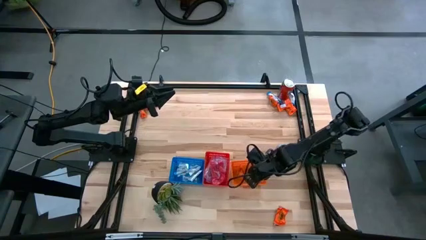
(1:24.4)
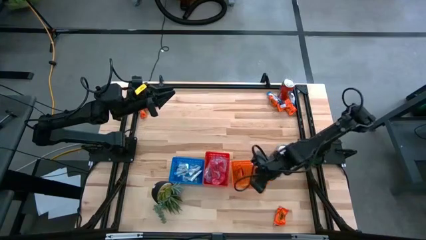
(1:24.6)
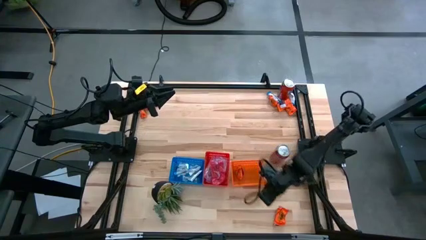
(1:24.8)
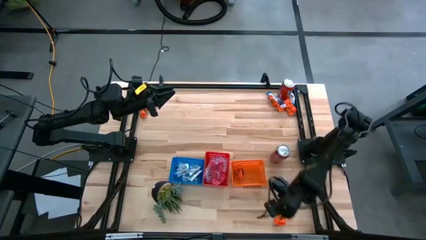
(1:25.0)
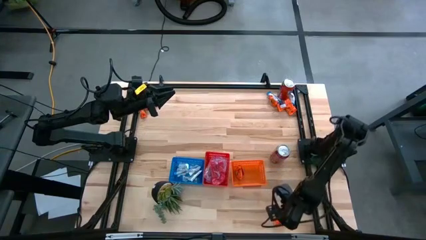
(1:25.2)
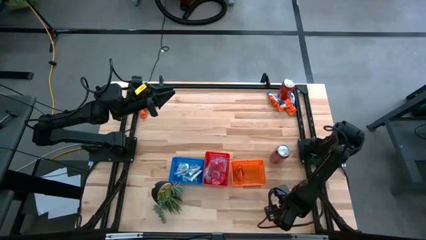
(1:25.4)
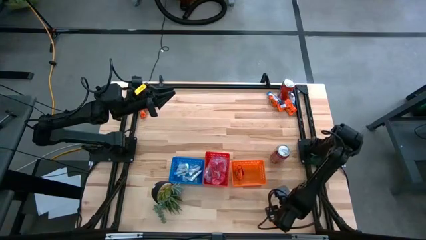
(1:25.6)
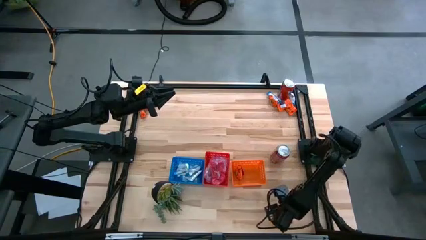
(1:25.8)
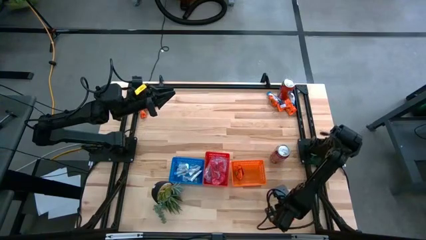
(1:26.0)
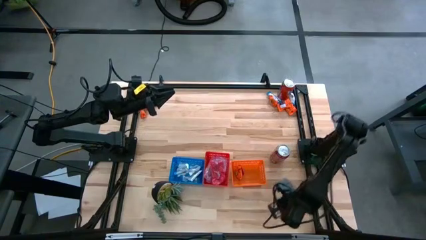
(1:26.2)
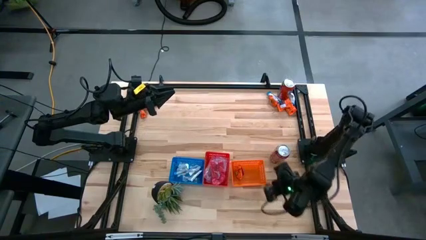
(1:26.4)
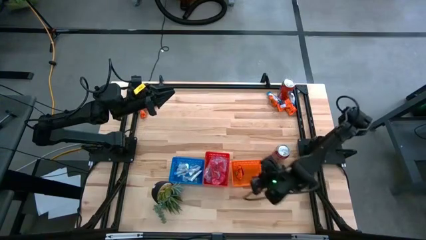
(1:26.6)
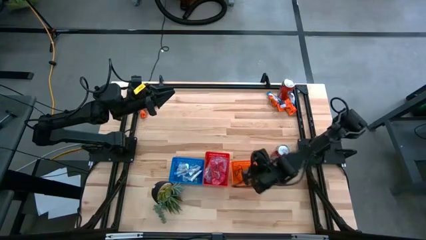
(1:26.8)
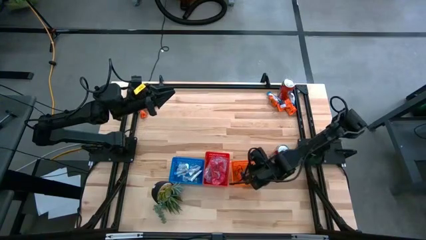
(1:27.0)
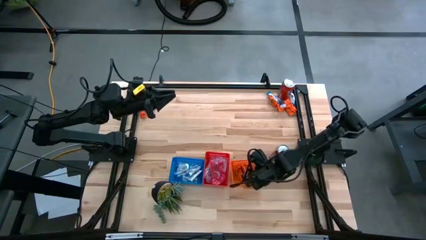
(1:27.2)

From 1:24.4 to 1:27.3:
Task: Sort candy
Put the orange candy pack into the orange bin

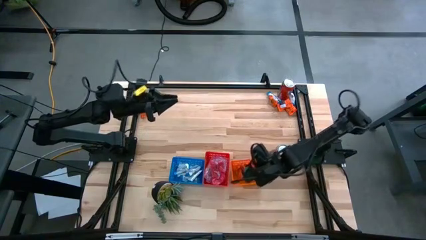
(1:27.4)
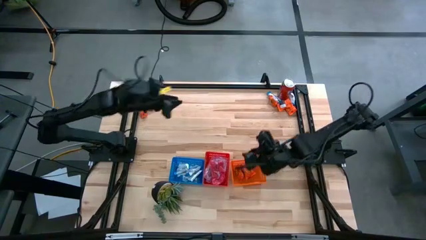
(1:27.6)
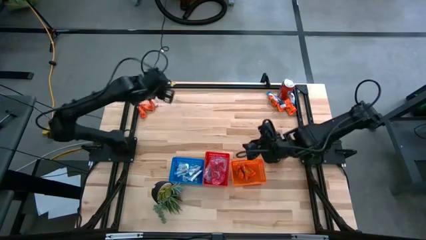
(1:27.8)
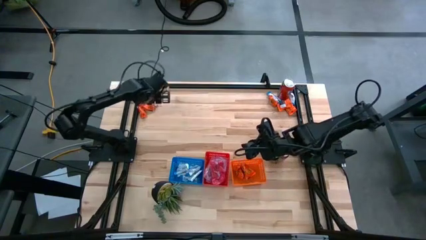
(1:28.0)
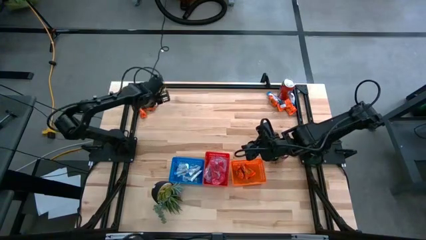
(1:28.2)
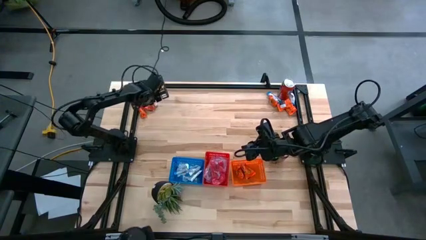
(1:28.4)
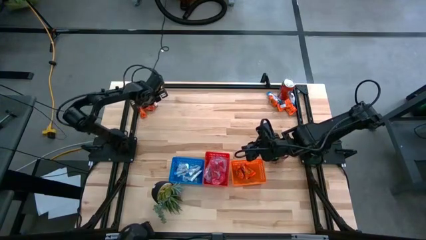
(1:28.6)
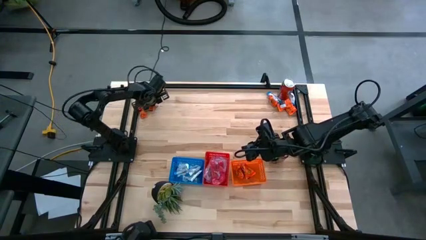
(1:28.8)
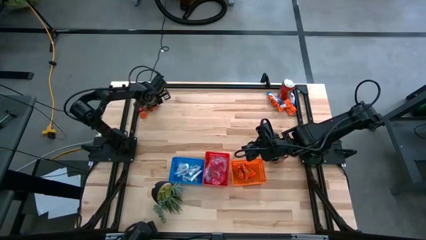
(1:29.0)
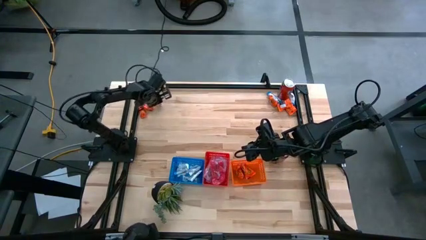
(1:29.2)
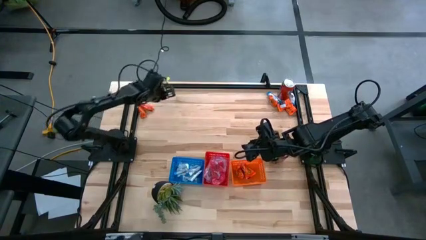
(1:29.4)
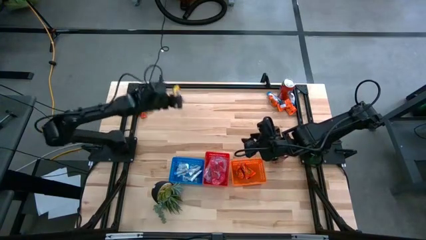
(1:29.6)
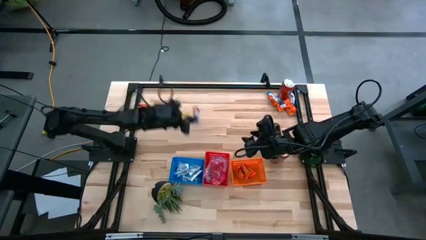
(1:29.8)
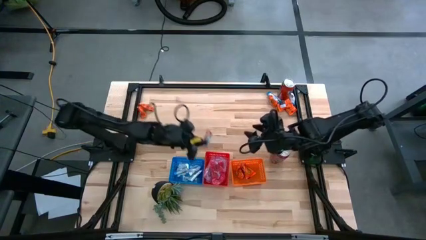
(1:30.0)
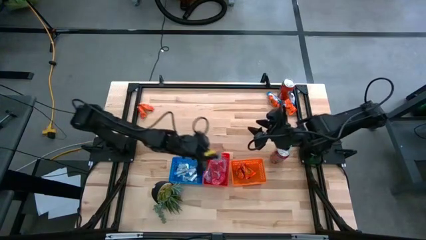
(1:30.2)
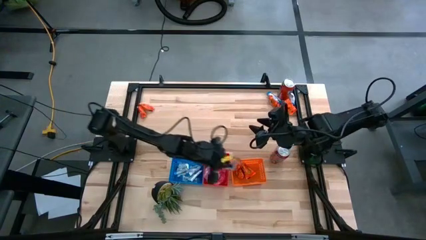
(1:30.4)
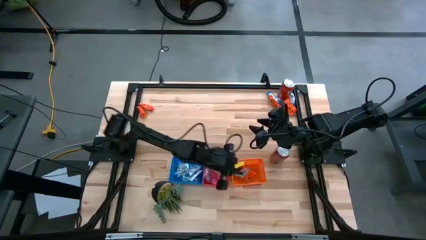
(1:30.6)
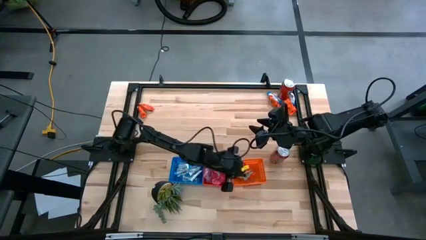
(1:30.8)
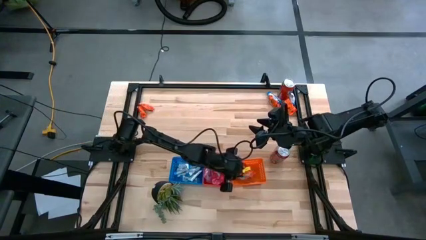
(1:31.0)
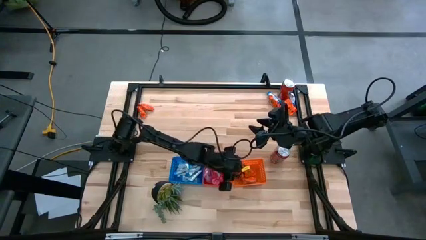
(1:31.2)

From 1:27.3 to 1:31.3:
Put the orange candy pack into the orange bin

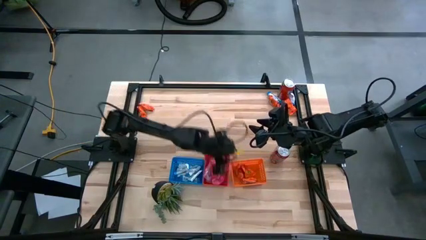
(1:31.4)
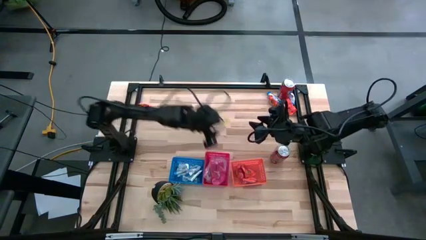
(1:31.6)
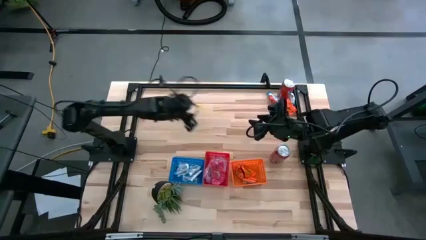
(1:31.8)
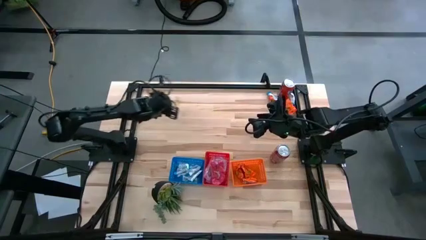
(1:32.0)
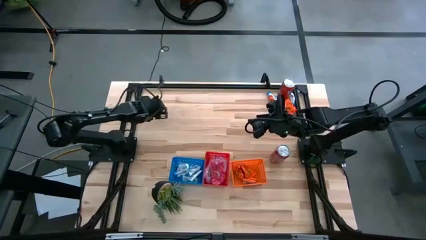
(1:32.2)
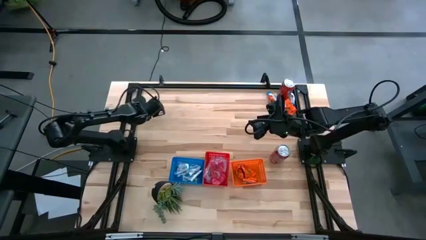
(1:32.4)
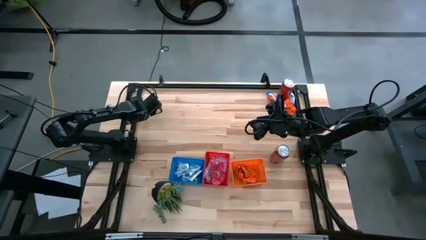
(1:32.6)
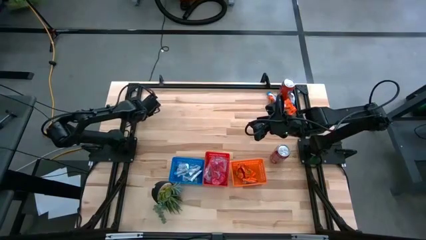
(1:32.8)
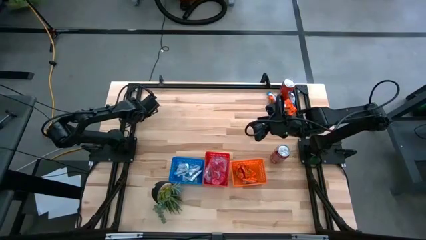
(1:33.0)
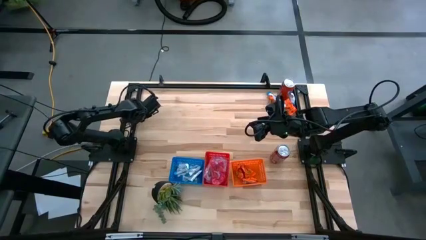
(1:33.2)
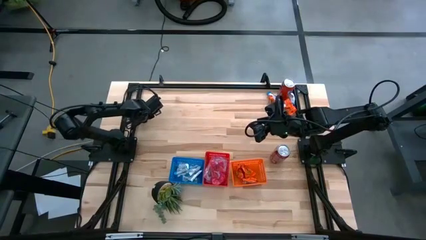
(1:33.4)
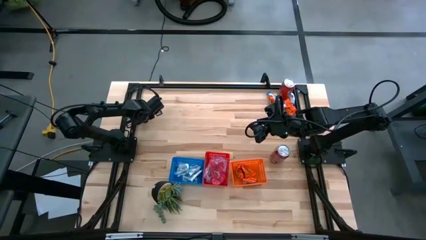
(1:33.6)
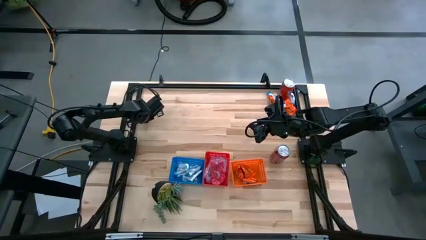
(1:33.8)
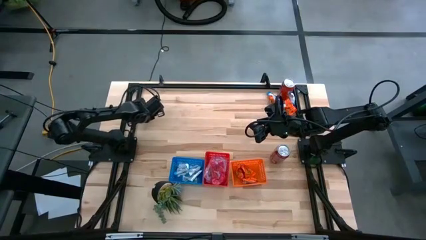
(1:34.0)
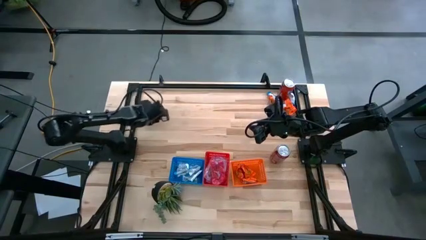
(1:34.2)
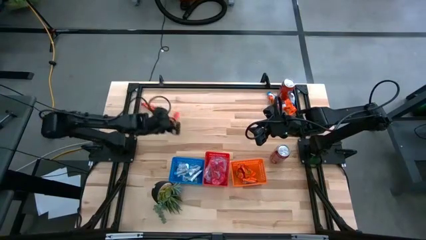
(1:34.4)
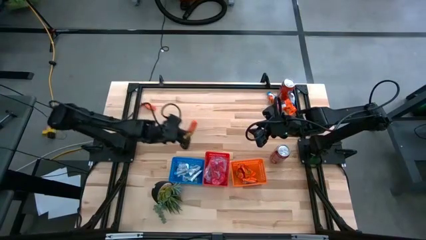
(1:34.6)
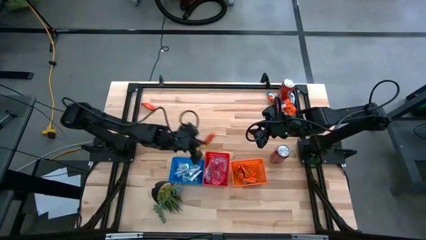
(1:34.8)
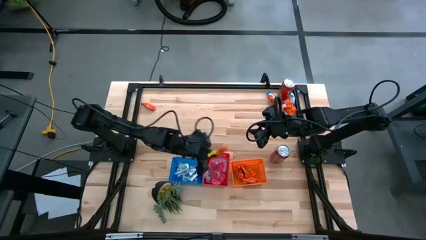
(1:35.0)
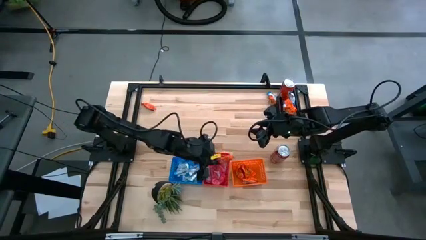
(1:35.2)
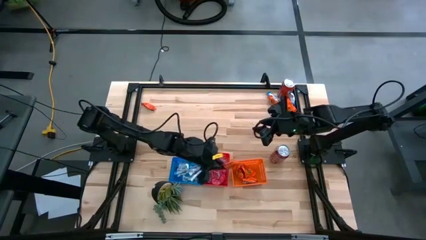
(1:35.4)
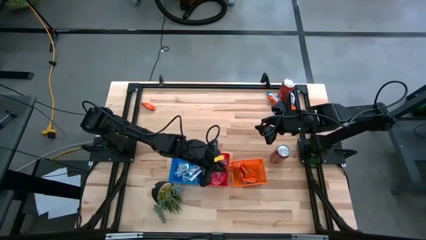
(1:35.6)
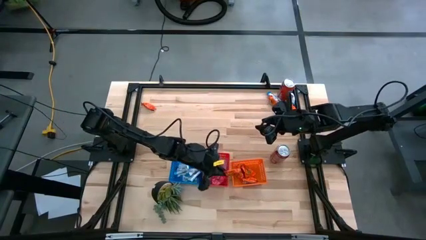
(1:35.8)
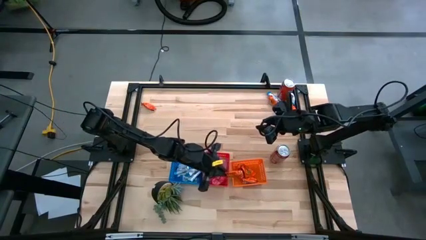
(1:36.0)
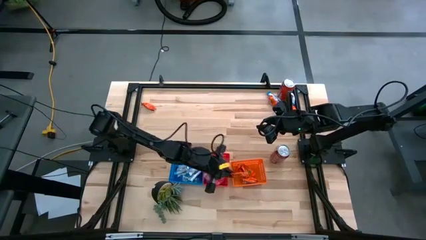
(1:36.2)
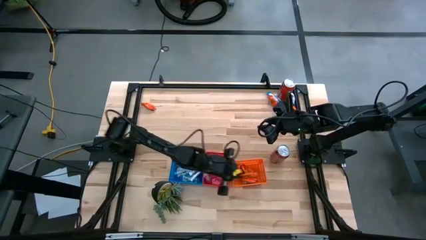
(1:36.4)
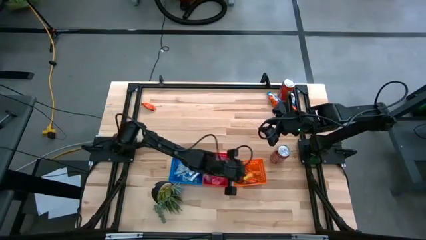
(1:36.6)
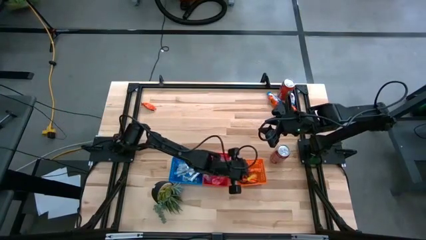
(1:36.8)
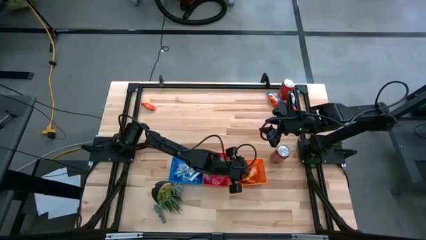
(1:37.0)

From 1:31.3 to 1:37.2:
Put the orange candy pack into the orange bin

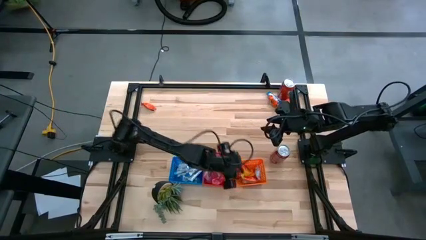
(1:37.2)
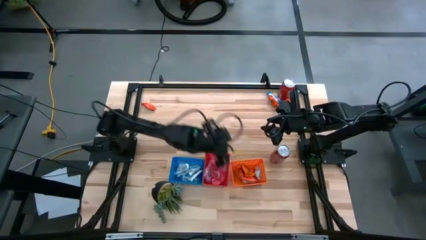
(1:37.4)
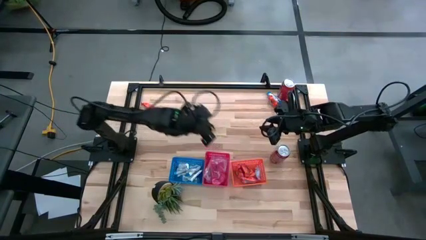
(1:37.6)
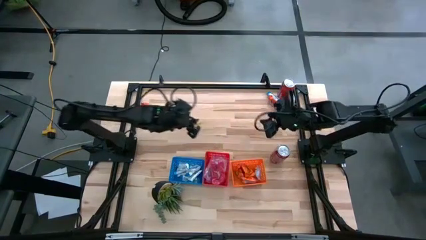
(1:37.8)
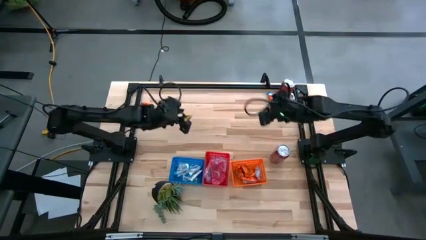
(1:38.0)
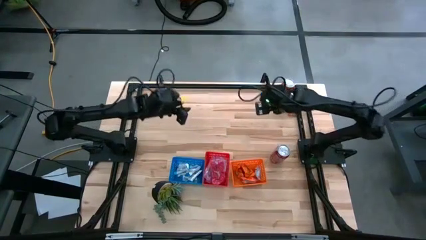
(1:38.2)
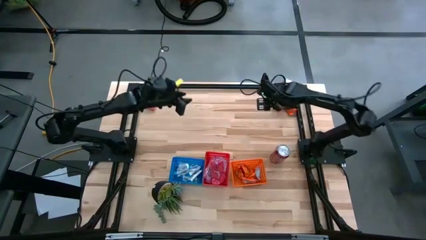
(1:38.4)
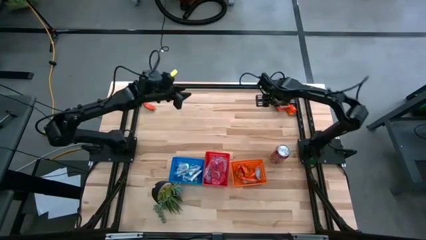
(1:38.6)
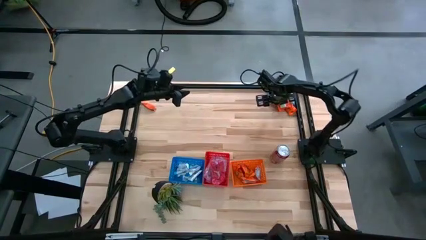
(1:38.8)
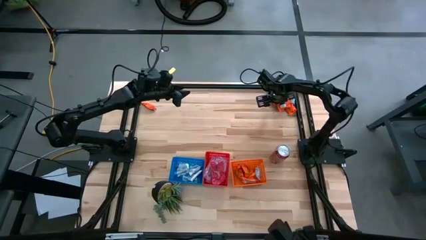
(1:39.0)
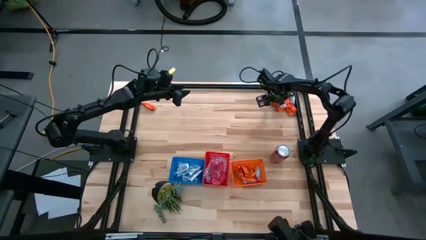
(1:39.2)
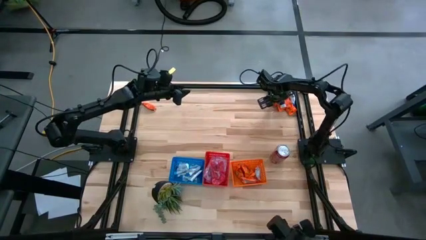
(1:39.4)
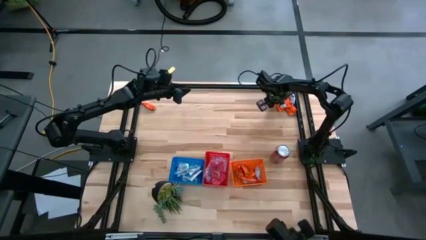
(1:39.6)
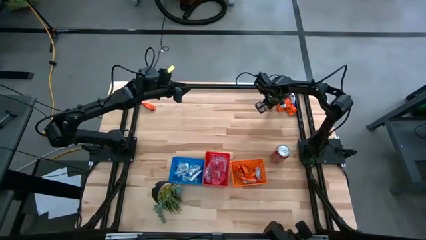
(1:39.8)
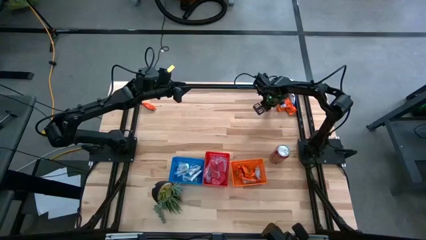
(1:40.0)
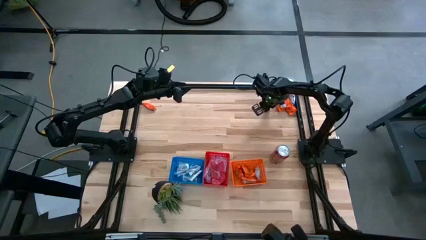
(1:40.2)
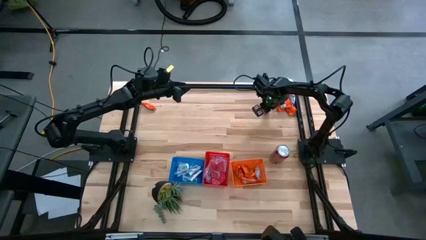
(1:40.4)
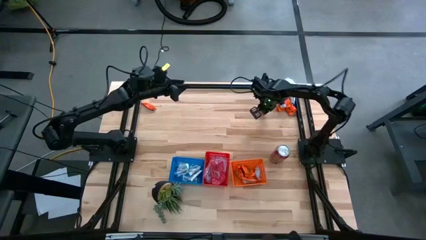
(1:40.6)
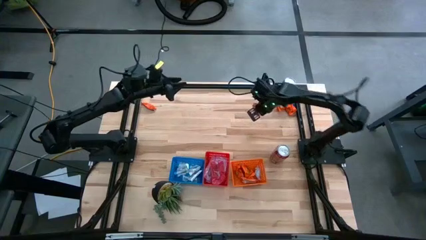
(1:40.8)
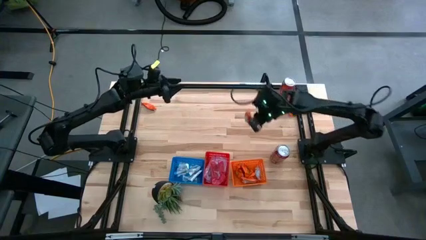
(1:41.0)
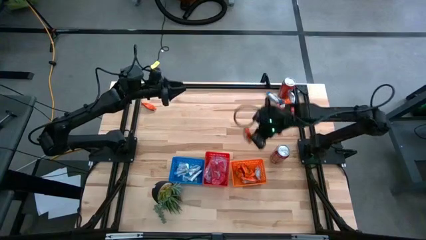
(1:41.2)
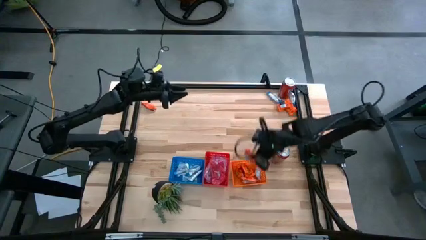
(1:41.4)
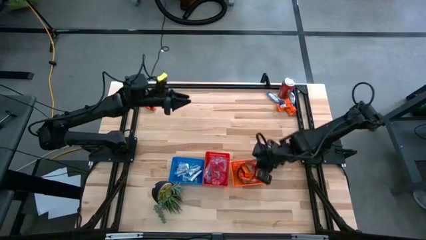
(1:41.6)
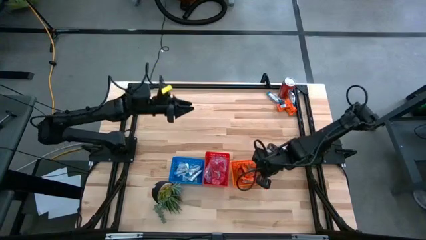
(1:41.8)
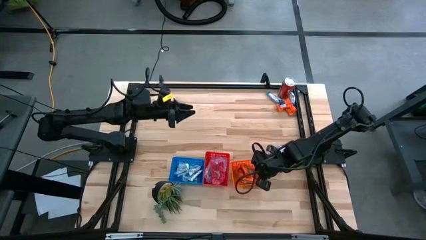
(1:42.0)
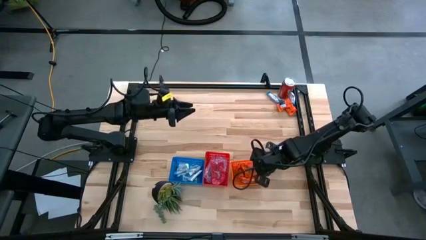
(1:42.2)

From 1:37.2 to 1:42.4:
Put the orange candy pack into the orange bin
